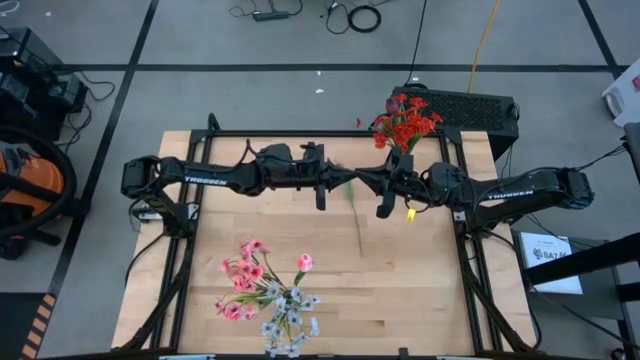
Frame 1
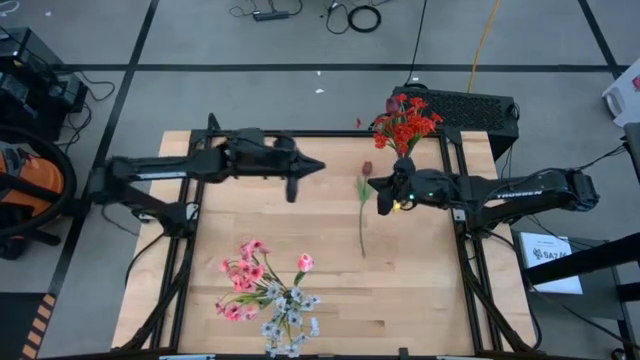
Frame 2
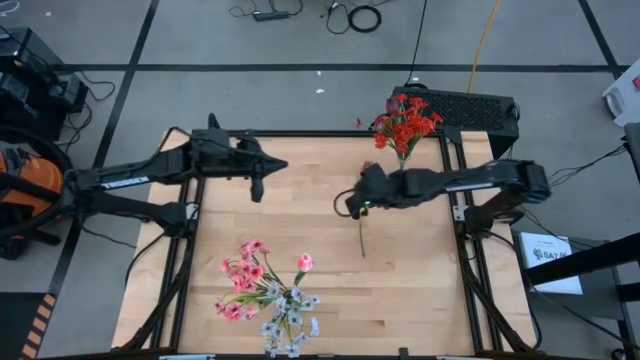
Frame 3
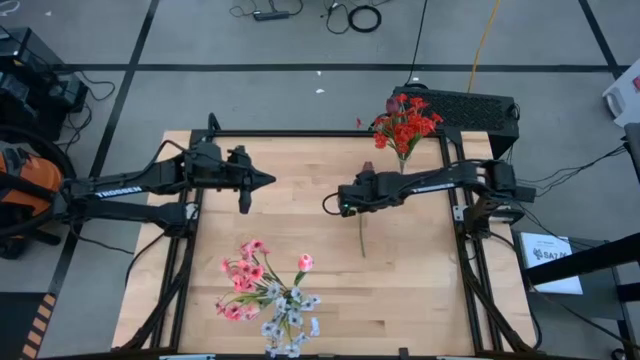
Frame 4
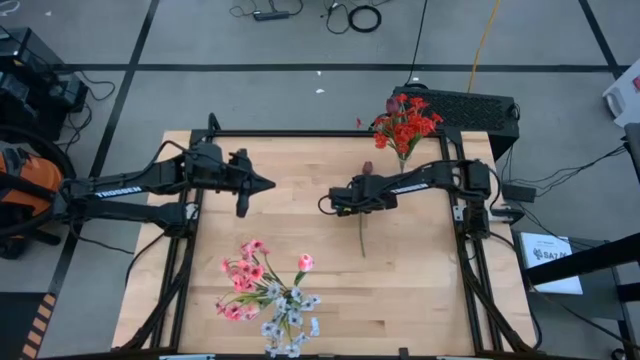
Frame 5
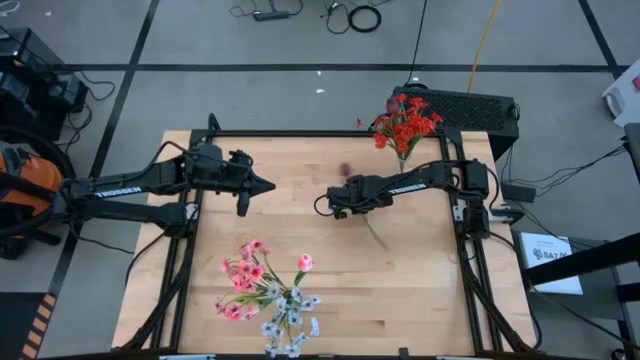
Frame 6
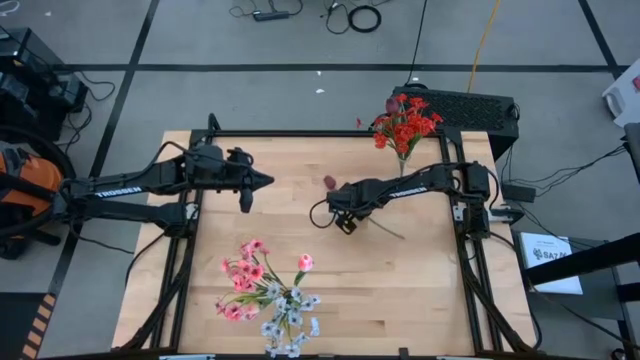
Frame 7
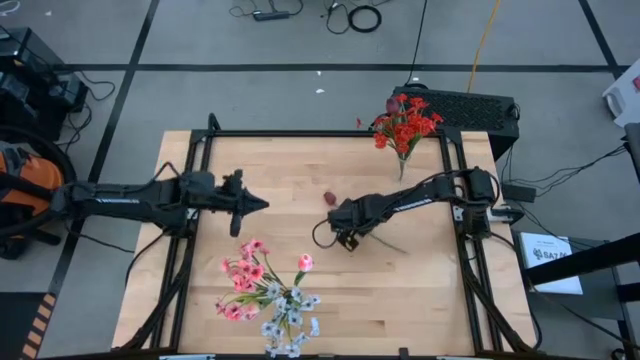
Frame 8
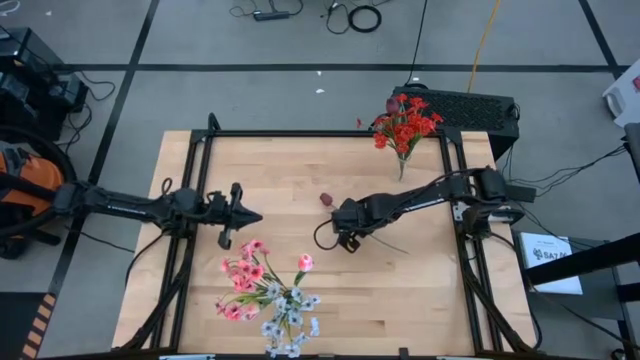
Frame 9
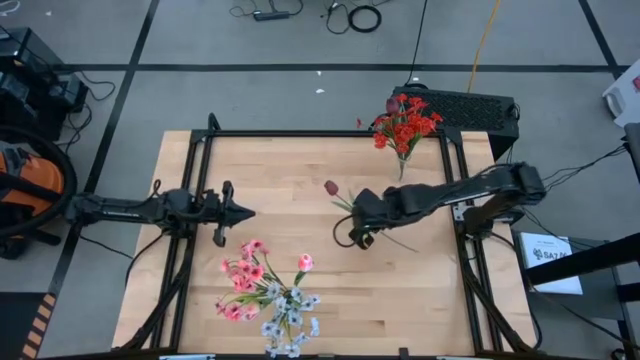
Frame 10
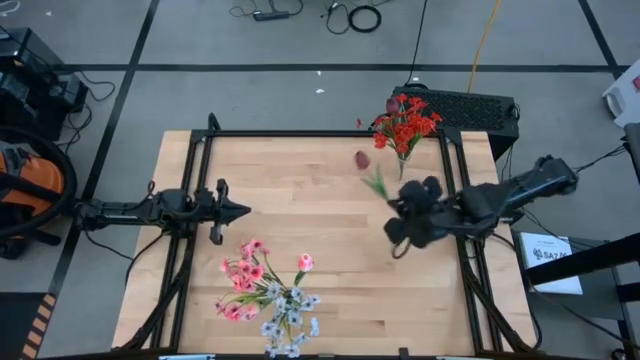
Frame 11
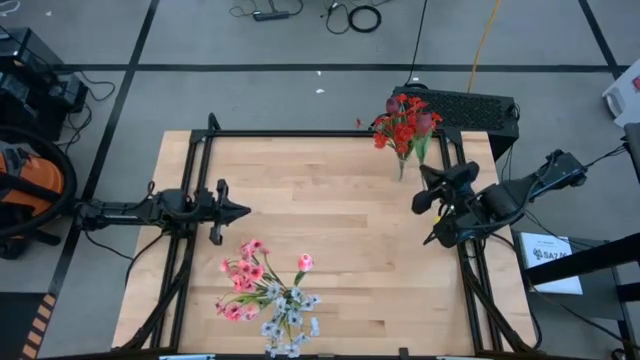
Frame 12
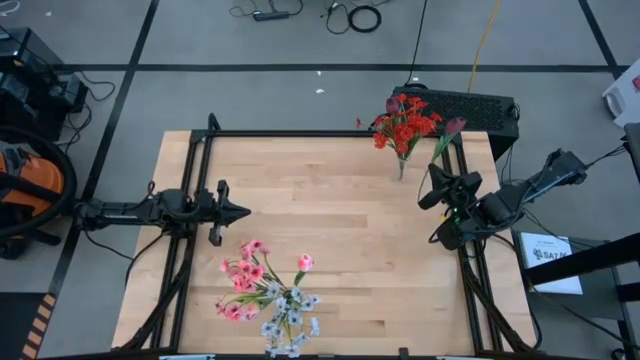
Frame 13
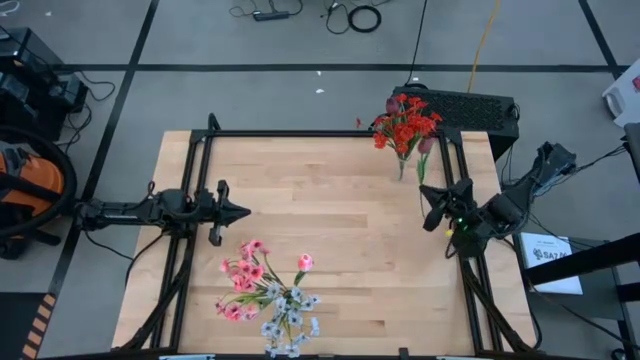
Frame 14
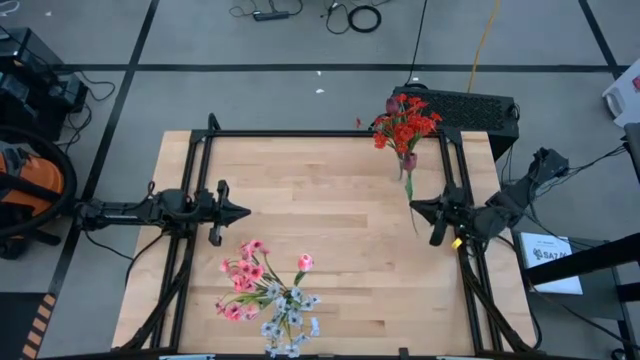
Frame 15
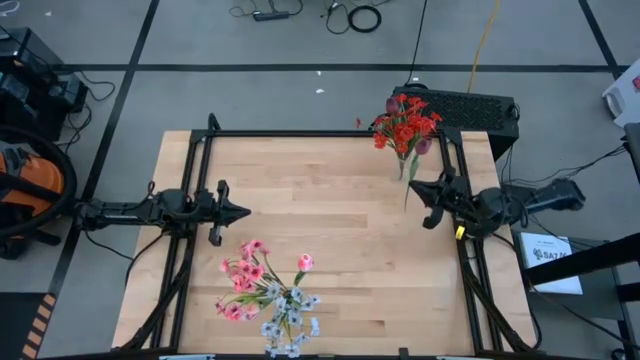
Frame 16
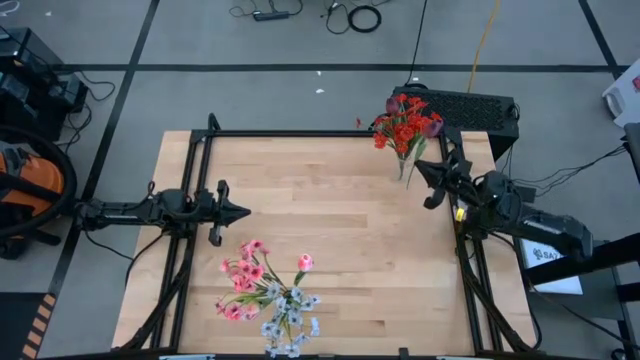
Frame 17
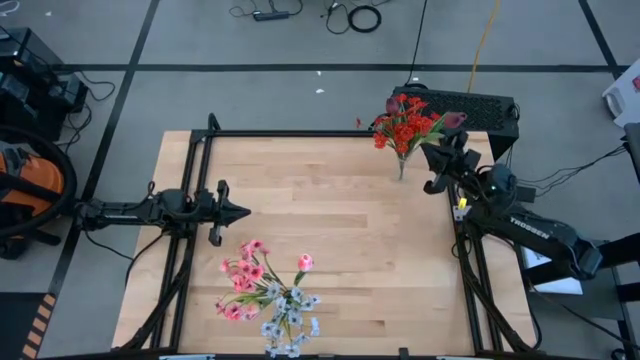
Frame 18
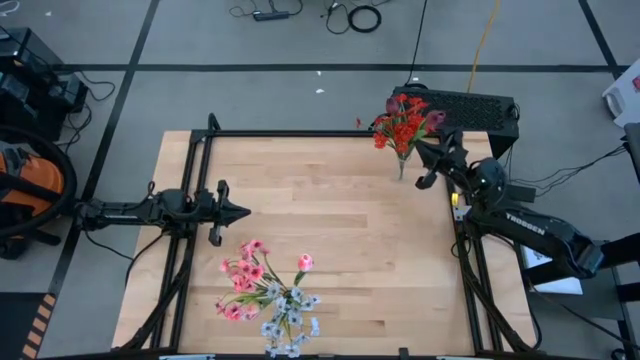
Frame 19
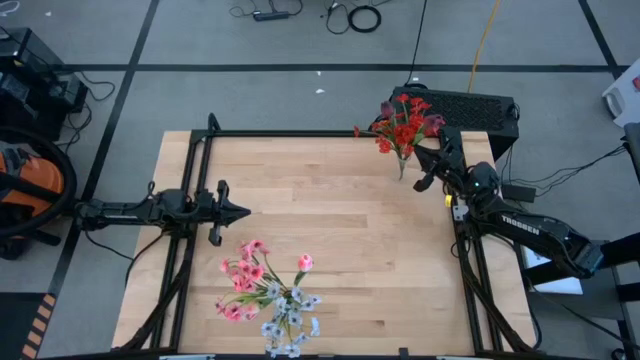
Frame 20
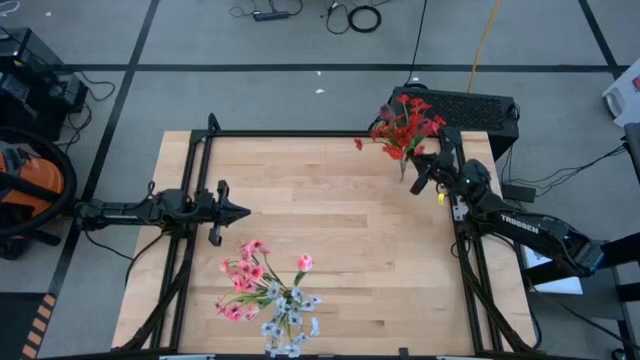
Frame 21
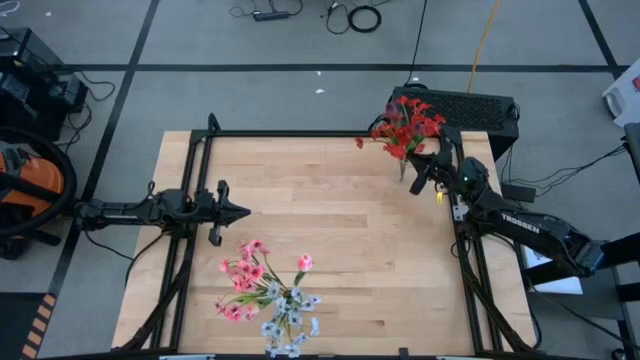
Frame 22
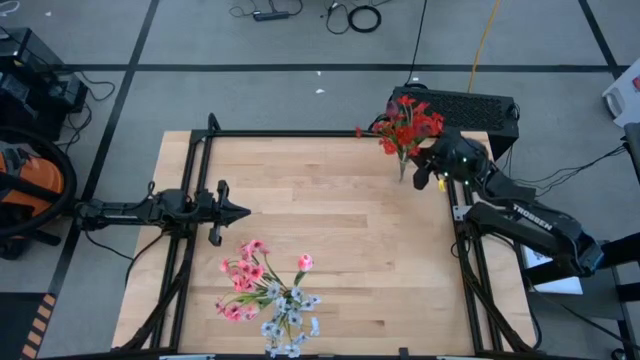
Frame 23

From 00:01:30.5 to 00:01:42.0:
Task: Sort flowers into vase by color
Put the red flower into the transparent vase

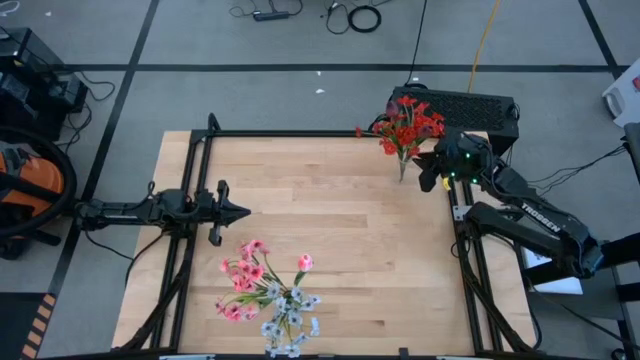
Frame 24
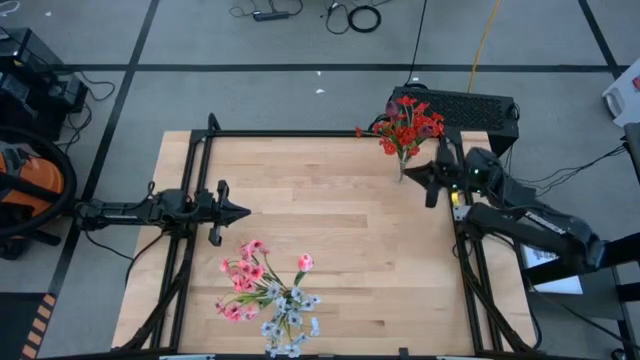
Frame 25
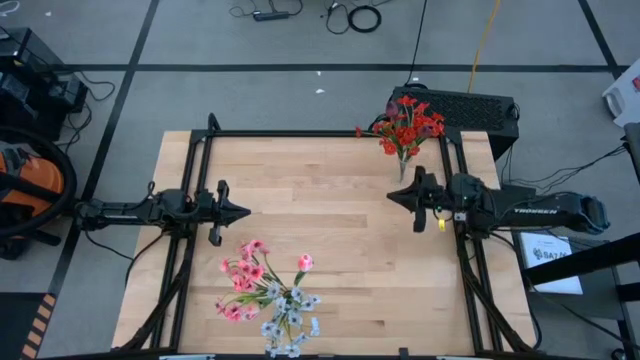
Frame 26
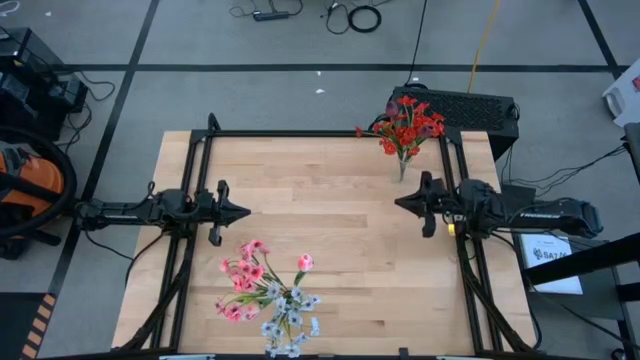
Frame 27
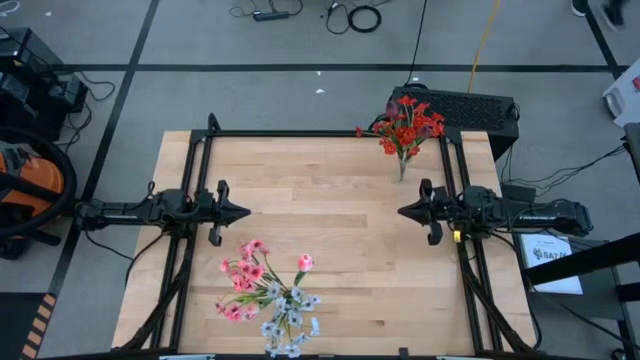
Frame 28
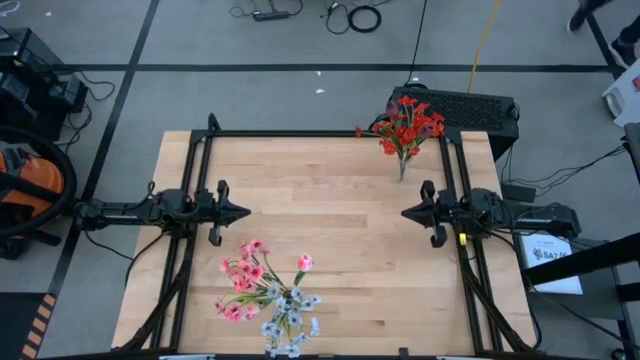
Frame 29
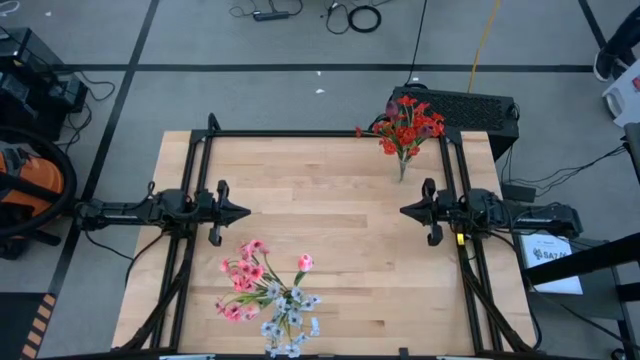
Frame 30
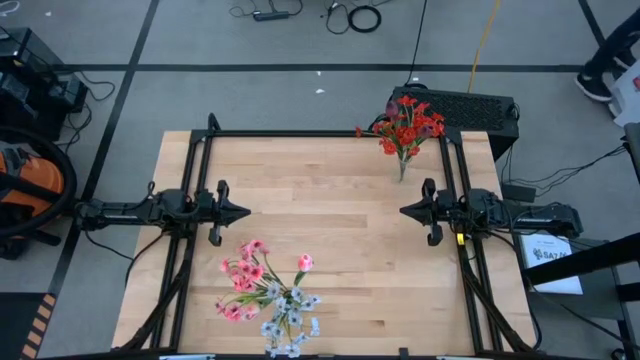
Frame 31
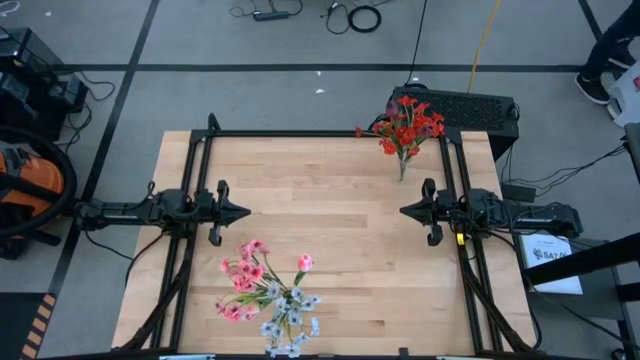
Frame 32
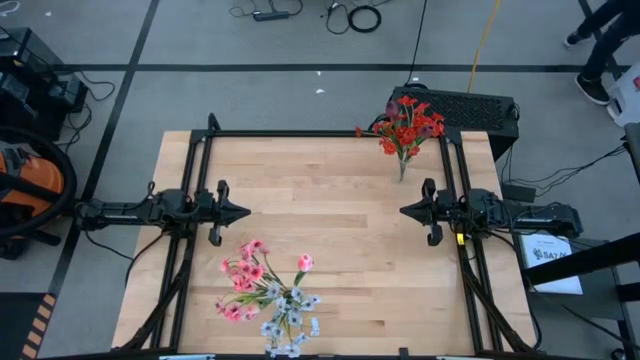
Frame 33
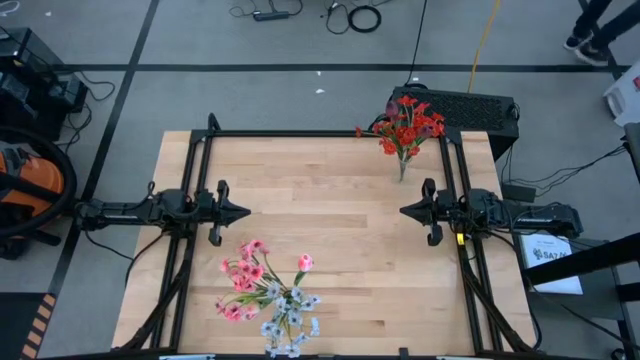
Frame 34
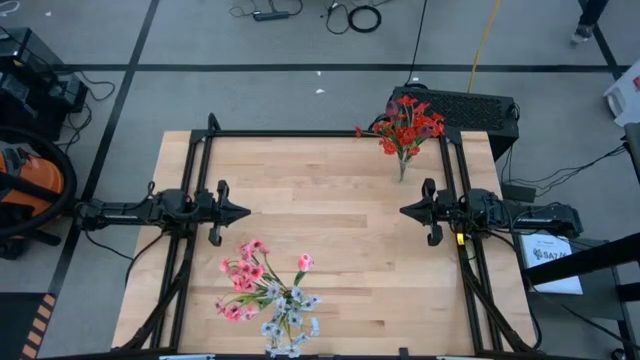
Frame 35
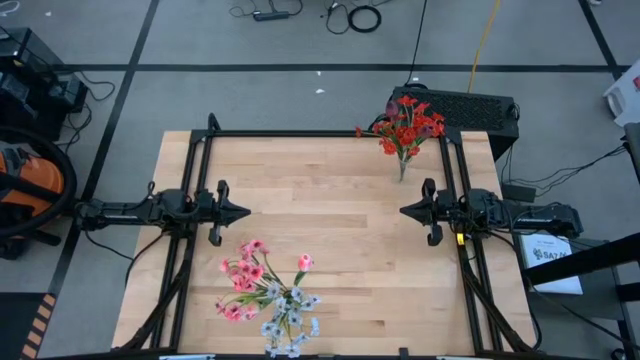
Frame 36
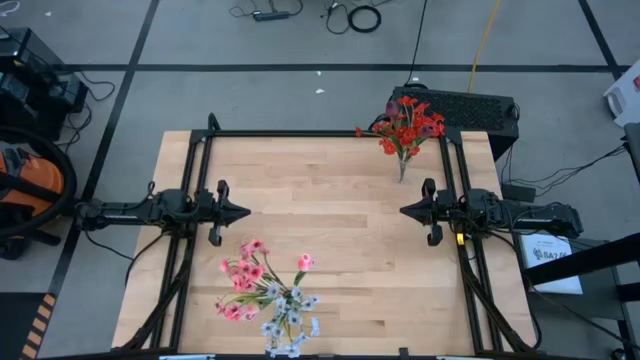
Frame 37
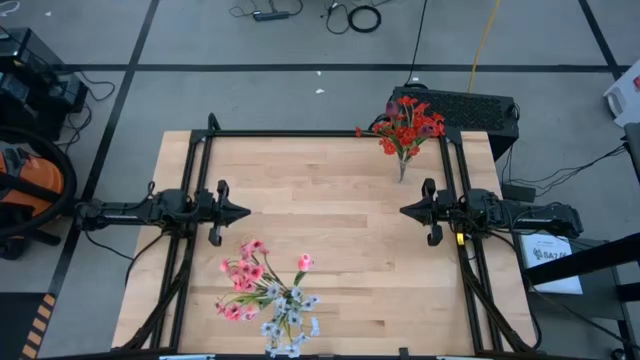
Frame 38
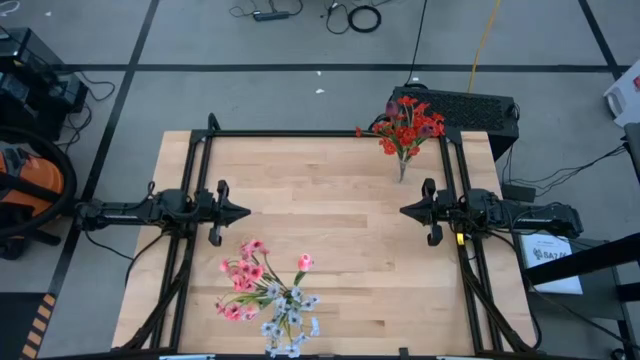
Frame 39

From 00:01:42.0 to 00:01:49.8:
Return to Home Position

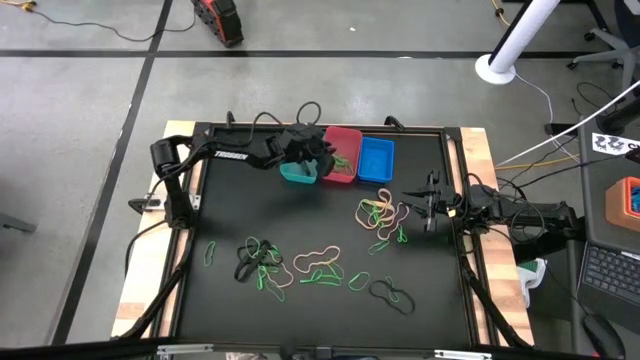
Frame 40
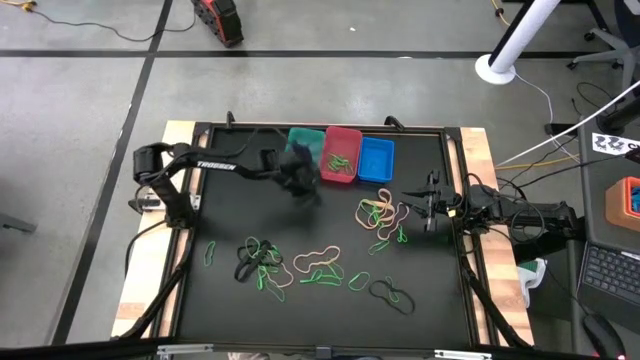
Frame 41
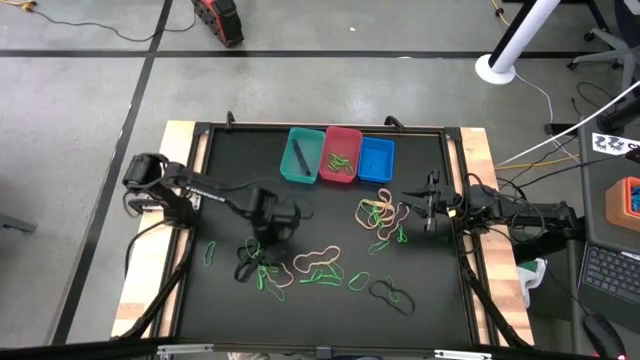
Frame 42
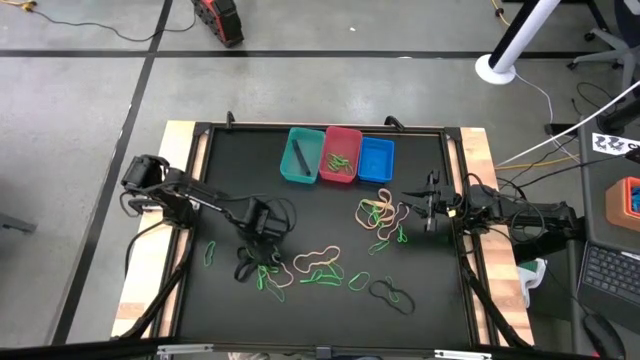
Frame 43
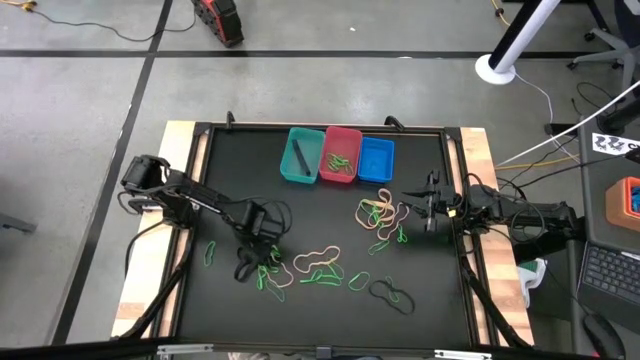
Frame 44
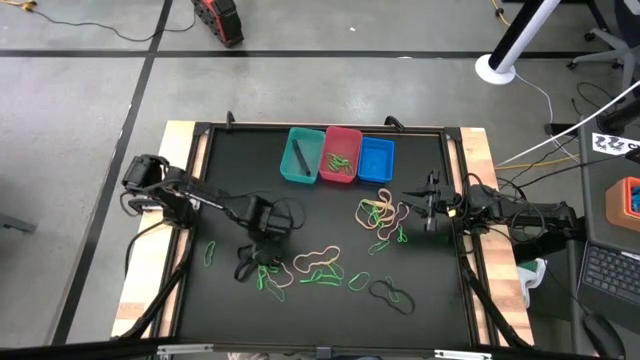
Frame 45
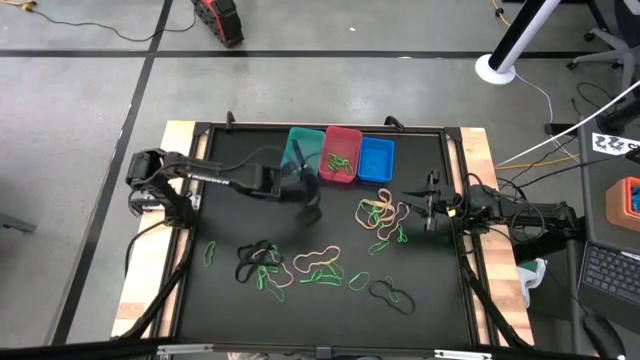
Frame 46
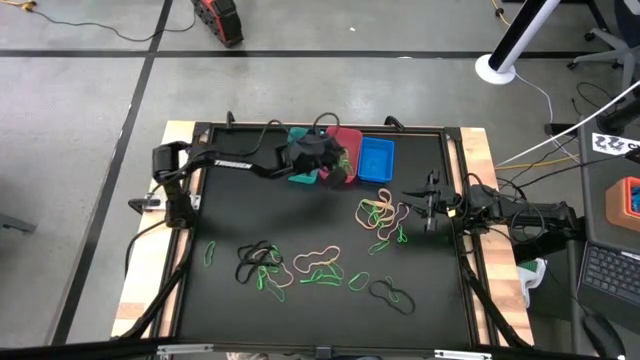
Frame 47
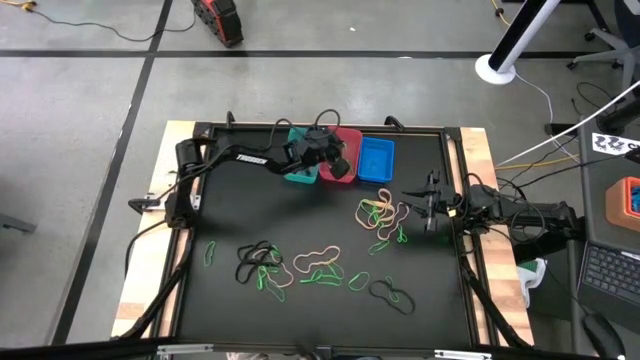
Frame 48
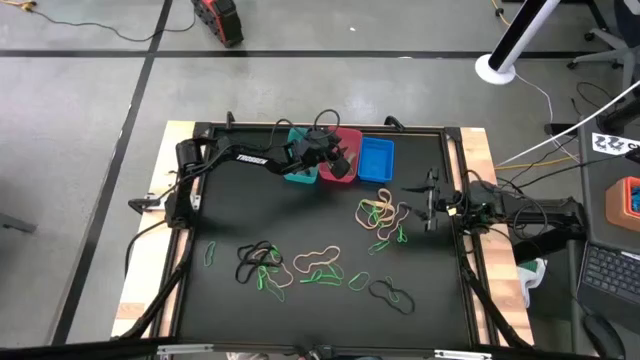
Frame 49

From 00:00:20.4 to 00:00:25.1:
Task: Sort rubber bands into baskets
Put the green rubber band into the pink bin
